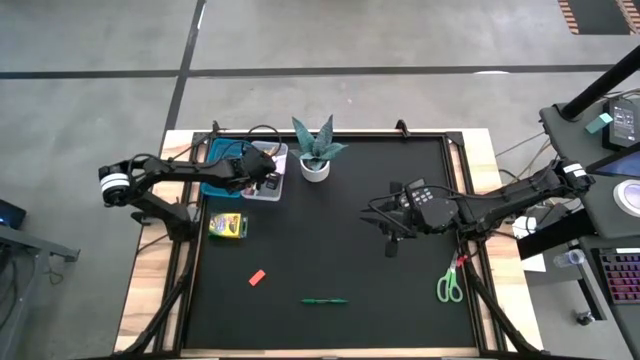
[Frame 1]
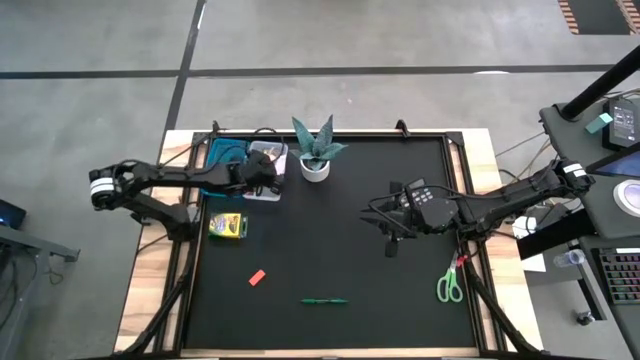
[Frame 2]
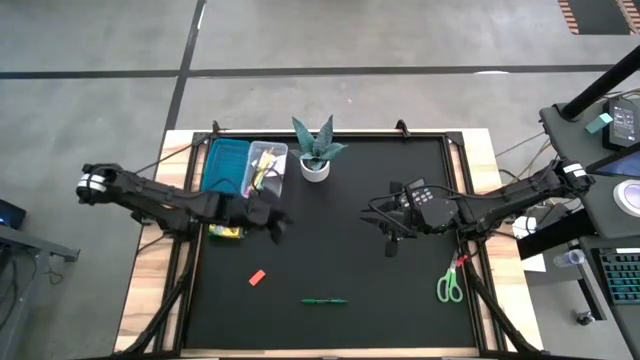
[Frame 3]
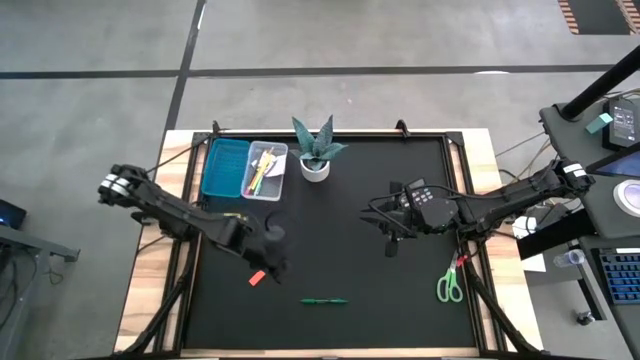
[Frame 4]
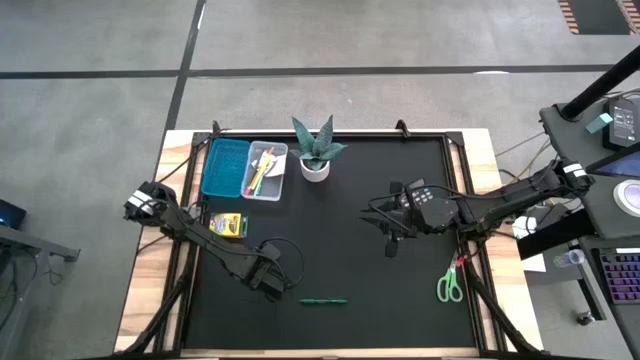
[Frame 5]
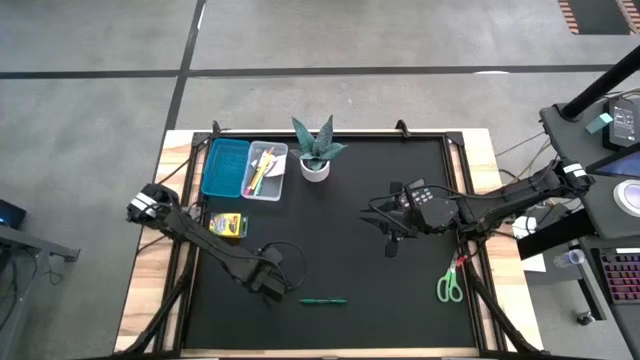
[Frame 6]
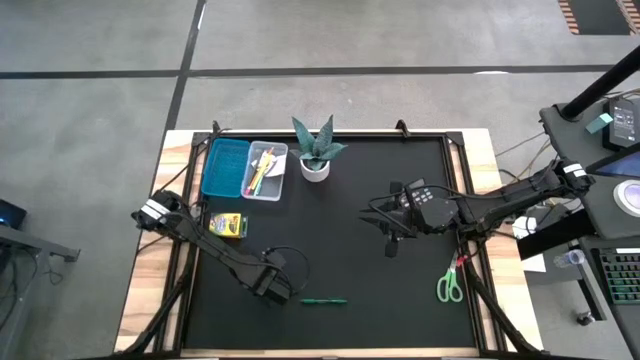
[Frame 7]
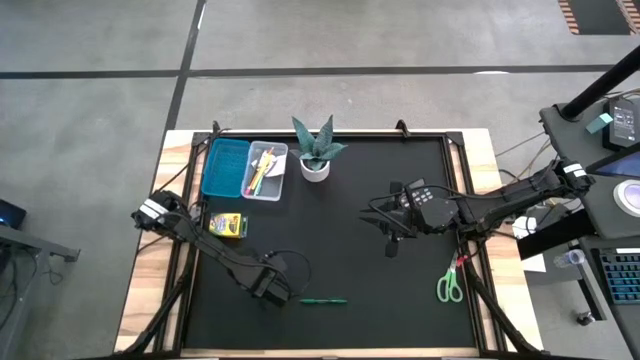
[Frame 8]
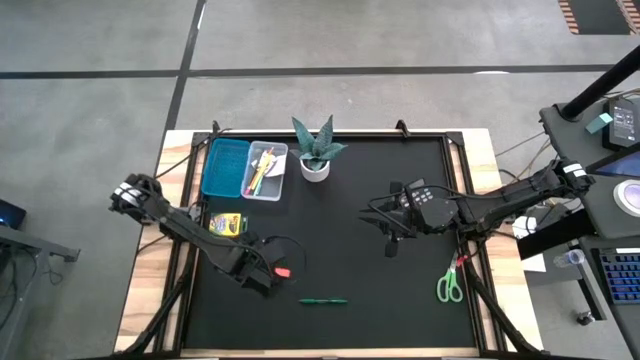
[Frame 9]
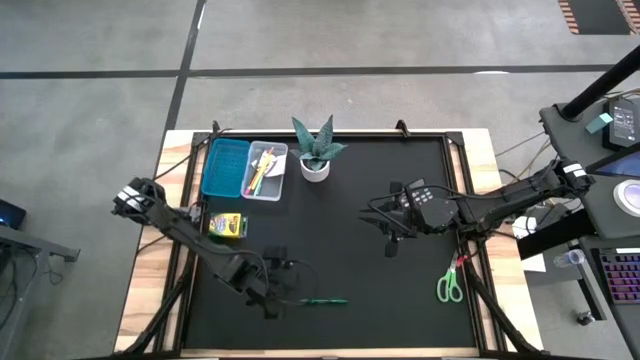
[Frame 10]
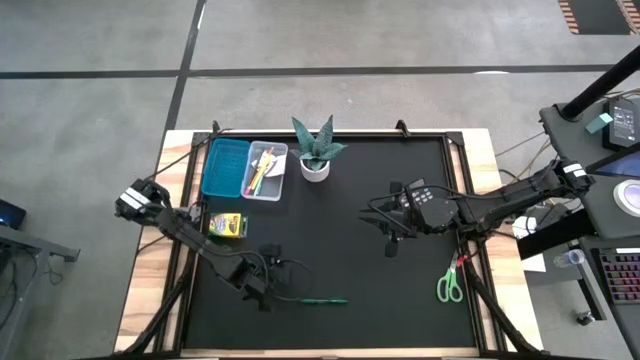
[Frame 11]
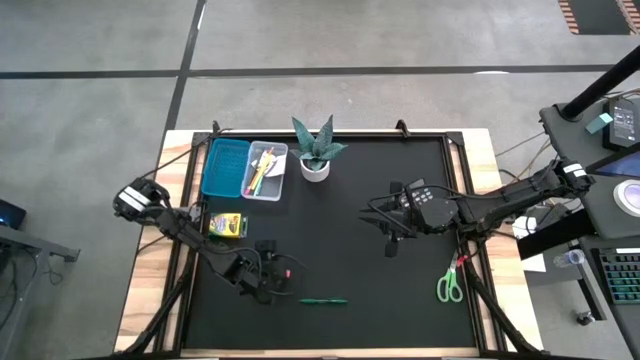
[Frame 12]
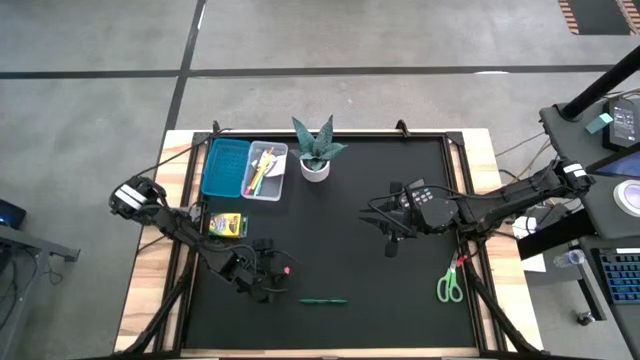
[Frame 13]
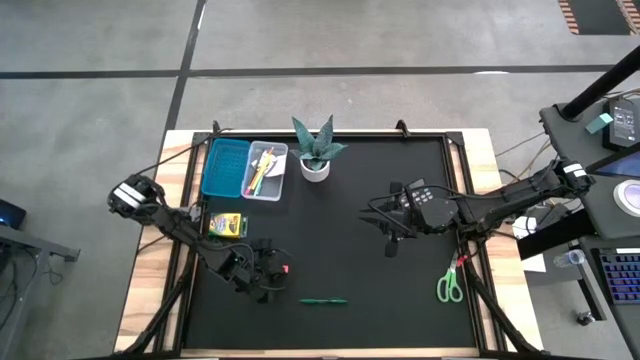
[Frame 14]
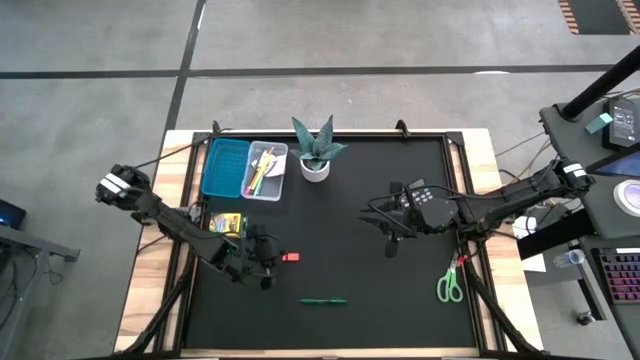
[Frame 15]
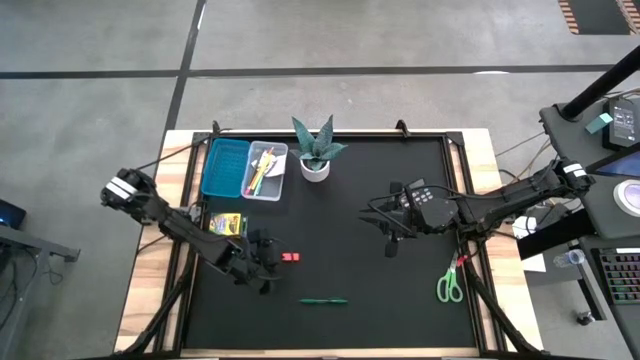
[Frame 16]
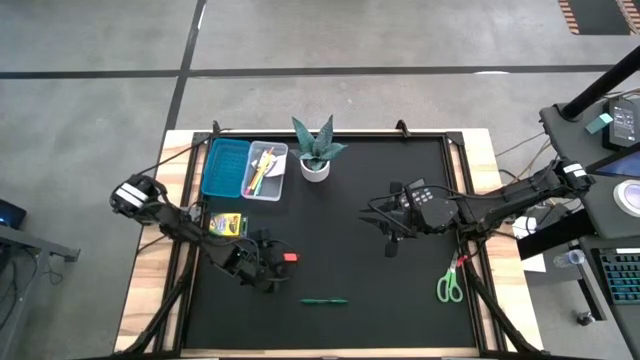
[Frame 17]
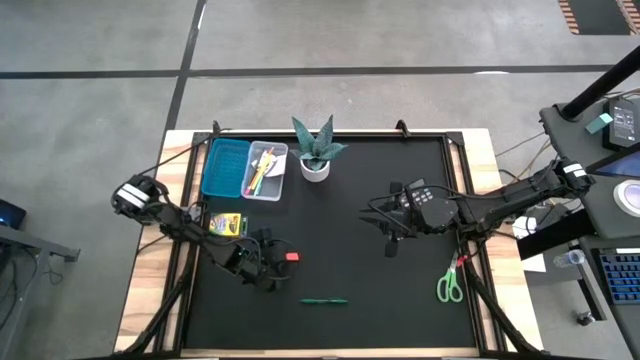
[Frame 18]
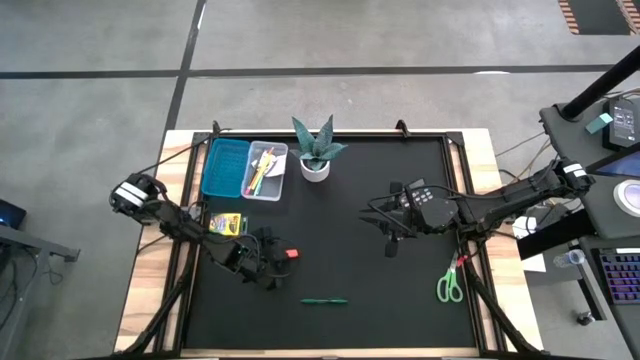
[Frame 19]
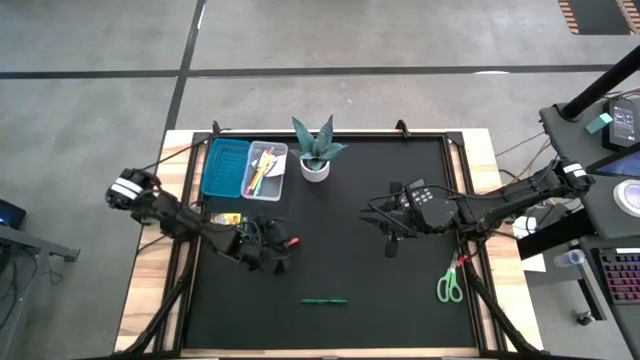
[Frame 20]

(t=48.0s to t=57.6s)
Task: Pack school essentials
Put the orange eraser into the blue supply box

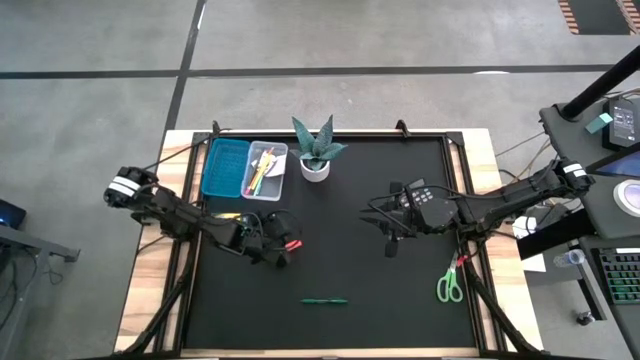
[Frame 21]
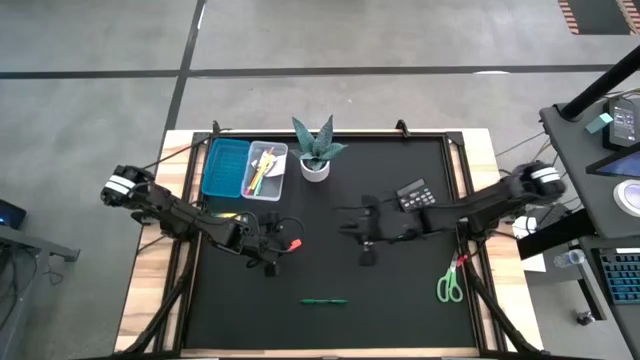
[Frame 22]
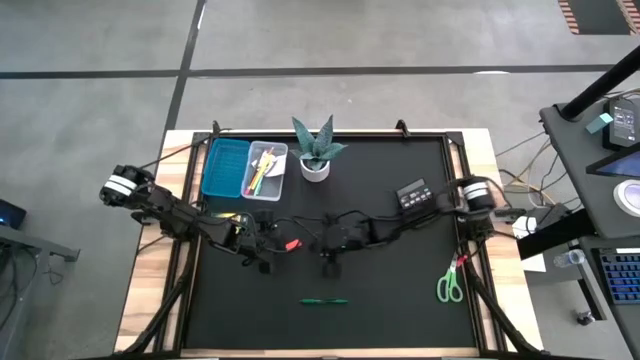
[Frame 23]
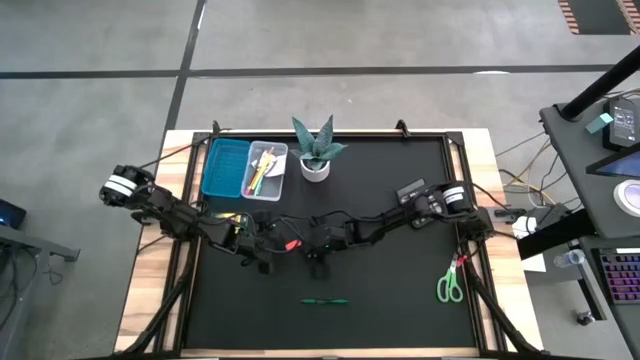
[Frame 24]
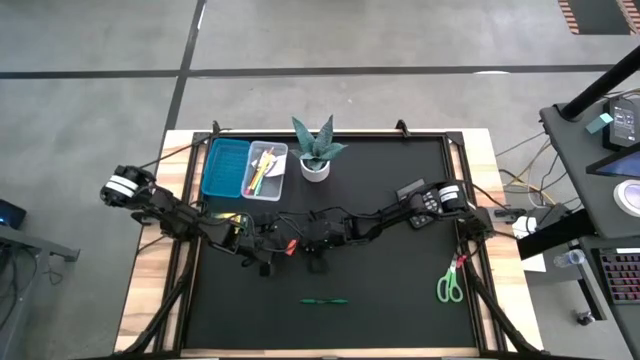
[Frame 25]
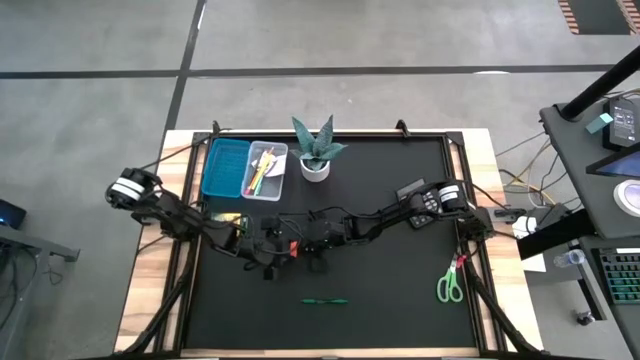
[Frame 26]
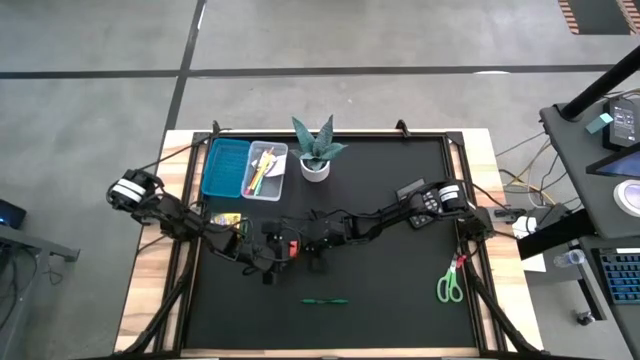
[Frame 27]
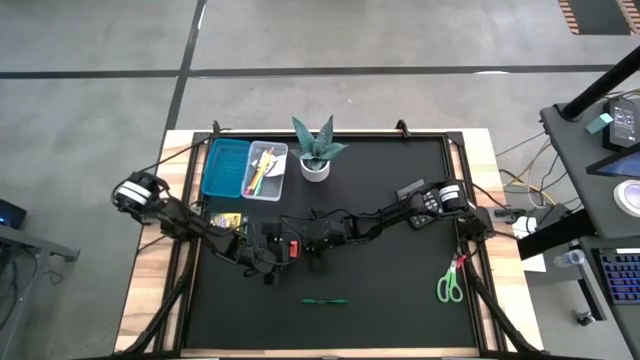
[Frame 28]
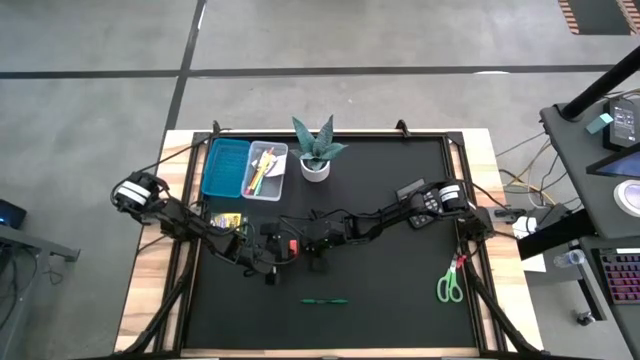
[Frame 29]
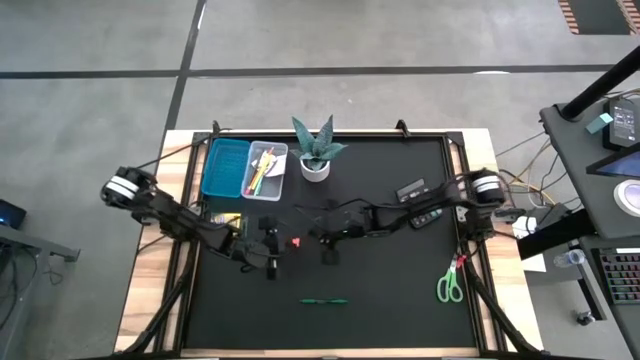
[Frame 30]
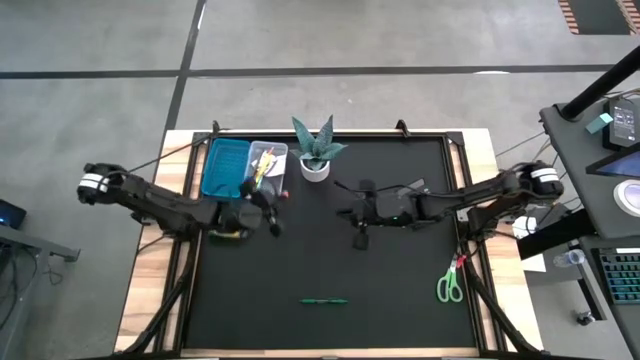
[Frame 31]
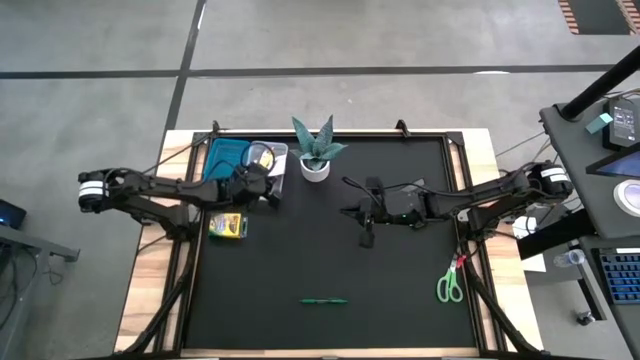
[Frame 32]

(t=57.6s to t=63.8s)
Put the orange eraser into the blue supply box

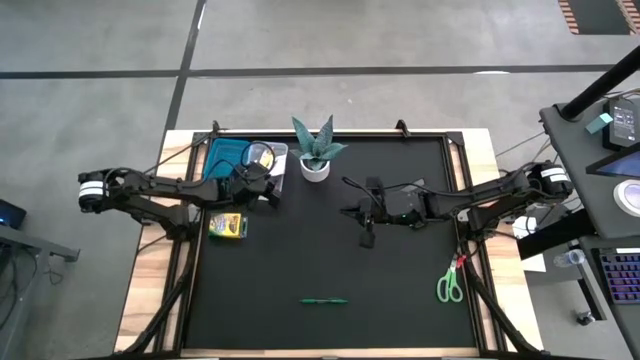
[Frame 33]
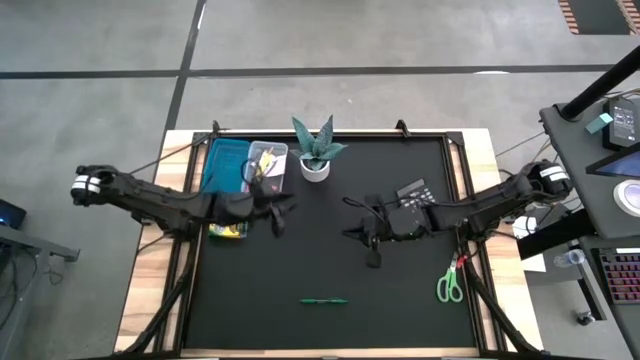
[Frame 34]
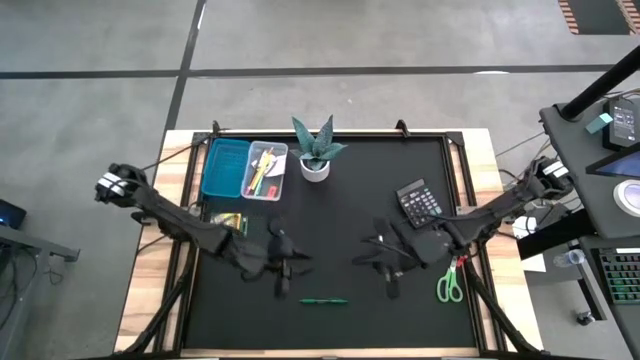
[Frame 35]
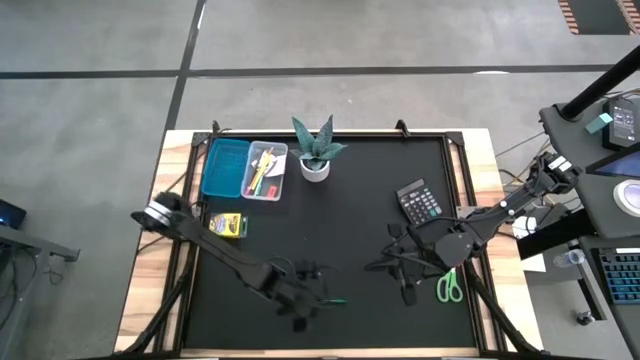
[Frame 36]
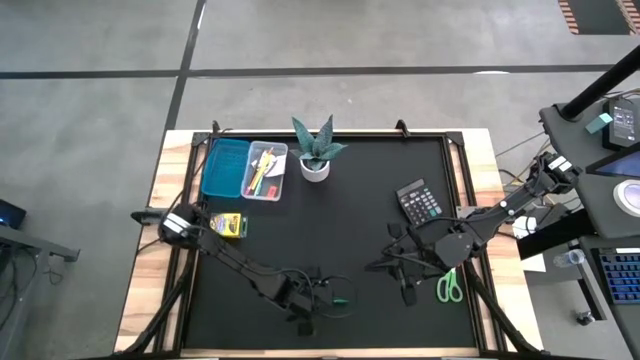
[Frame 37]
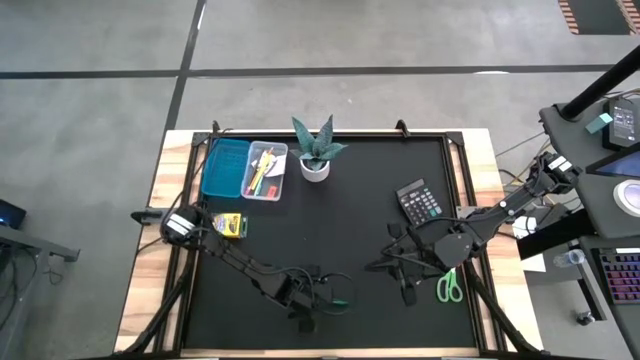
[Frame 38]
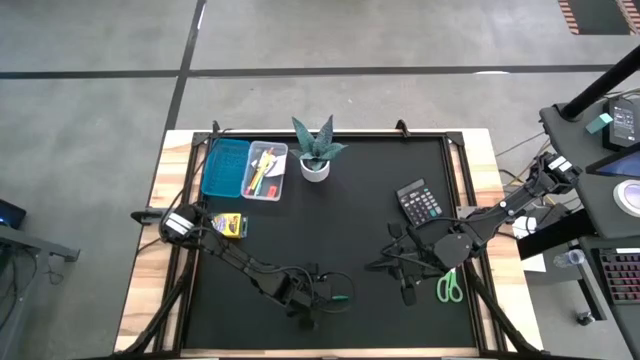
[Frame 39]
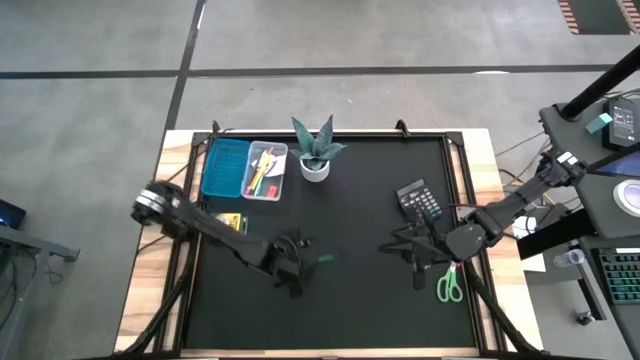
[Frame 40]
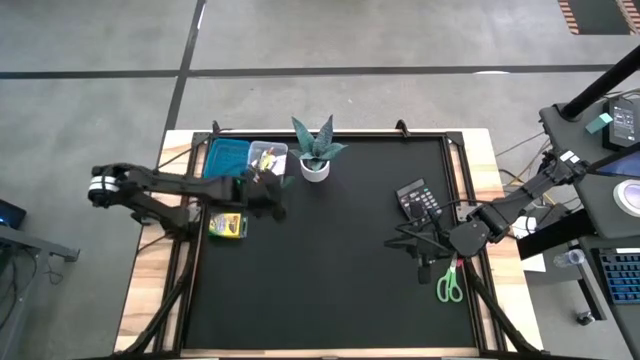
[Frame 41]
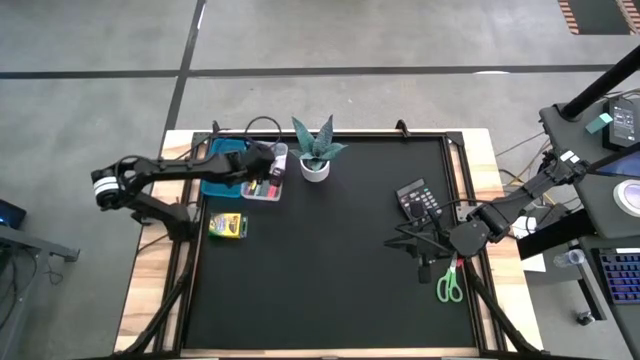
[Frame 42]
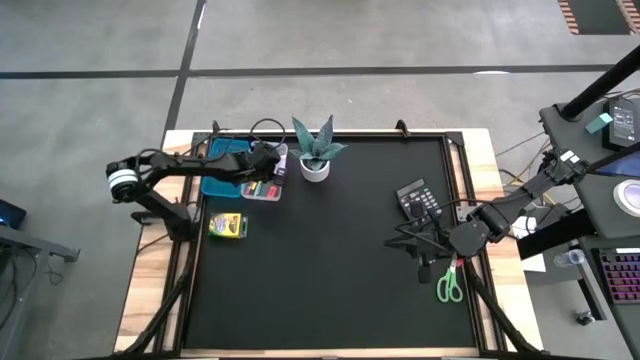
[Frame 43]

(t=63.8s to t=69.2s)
Put the green pen into the blue supply box
